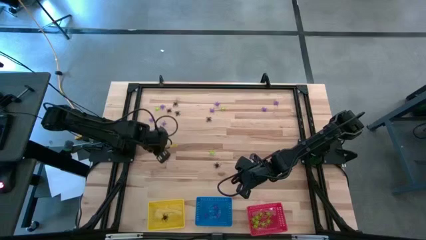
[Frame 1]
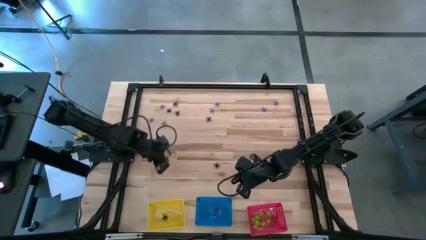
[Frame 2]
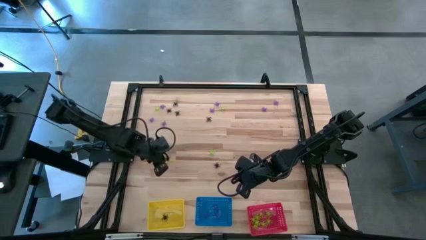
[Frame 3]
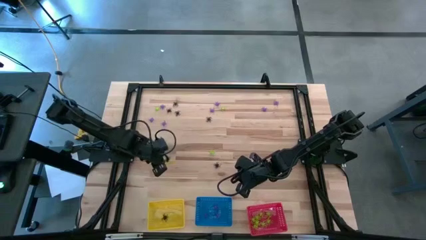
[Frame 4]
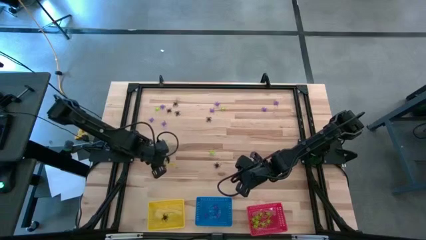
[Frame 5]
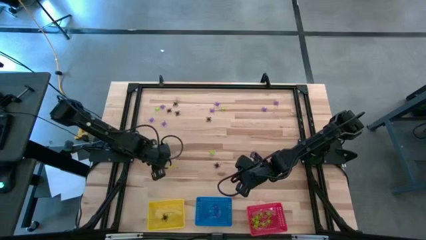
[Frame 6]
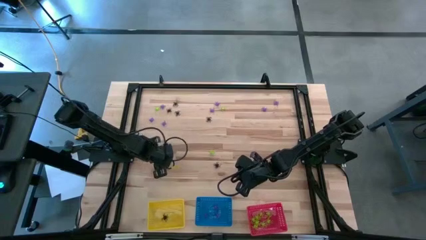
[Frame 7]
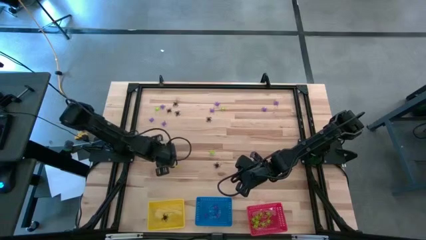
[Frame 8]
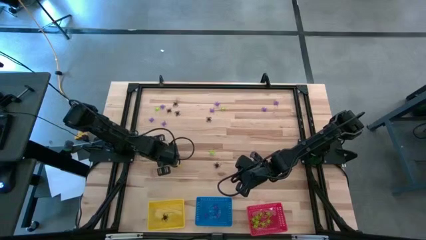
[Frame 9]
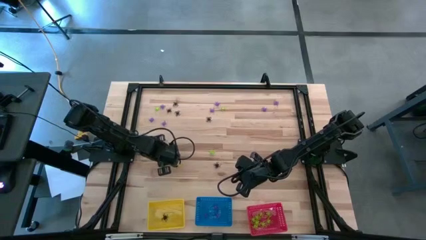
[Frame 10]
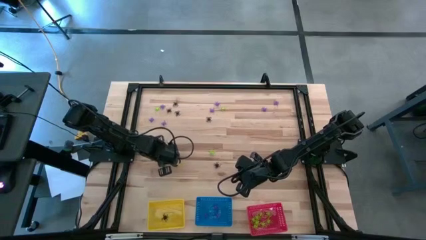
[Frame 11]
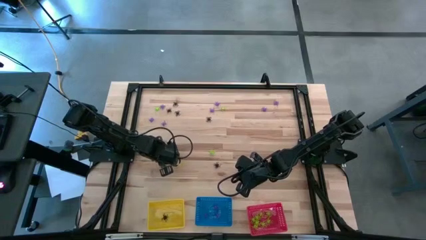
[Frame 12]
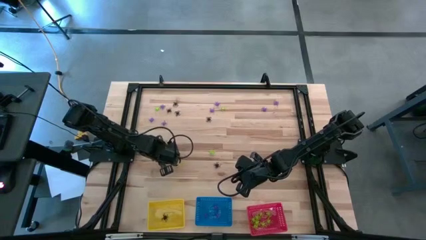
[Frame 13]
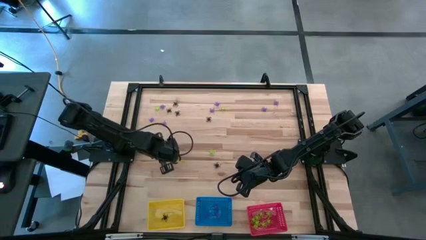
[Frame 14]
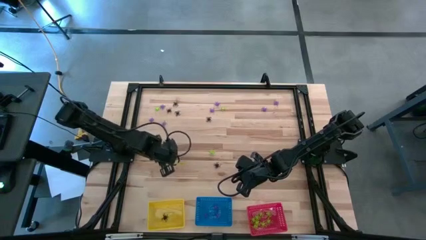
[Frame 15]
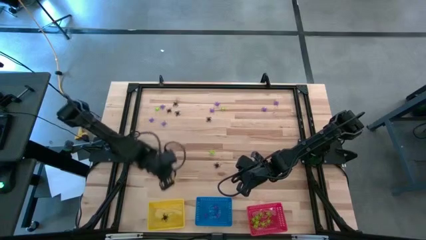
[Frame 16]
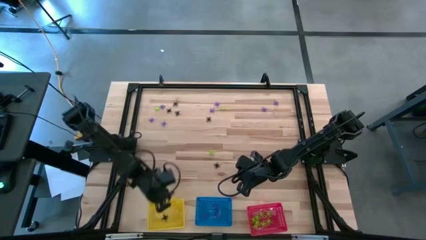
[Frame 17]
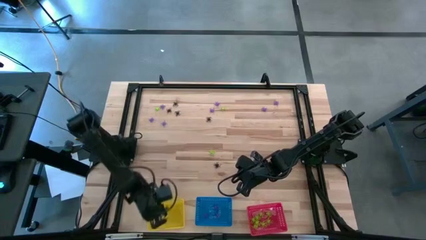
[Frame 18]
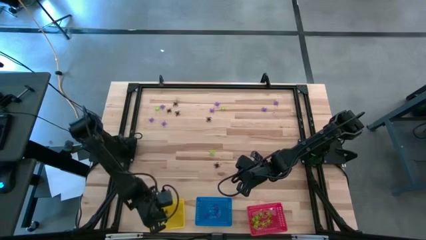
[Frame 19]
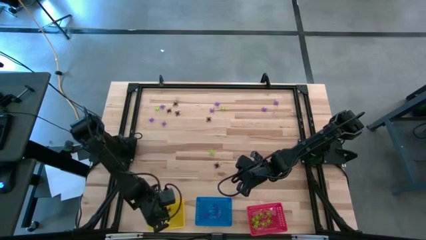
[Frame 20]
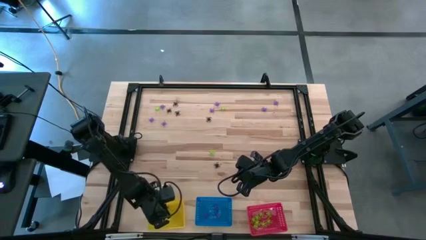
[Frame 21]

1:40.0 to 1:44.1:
Task: Sort Halloween decoration
Put the black spider toy into the yellow bin

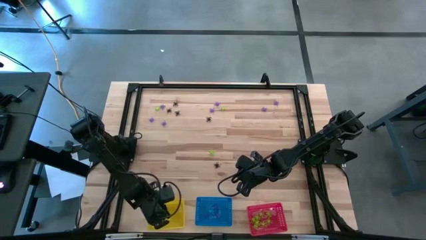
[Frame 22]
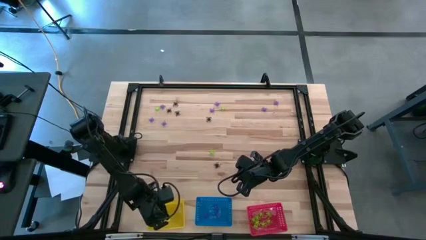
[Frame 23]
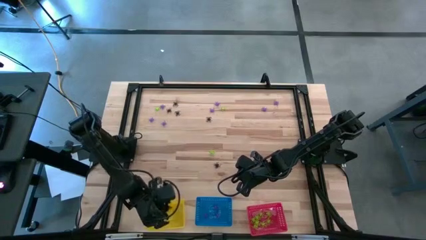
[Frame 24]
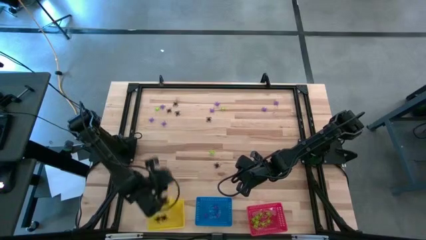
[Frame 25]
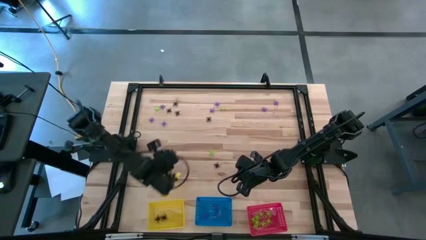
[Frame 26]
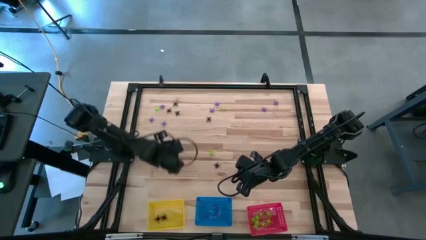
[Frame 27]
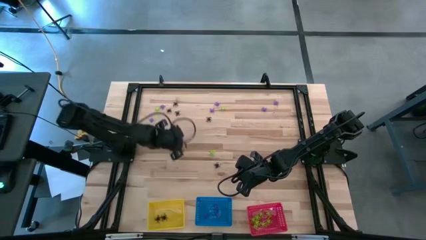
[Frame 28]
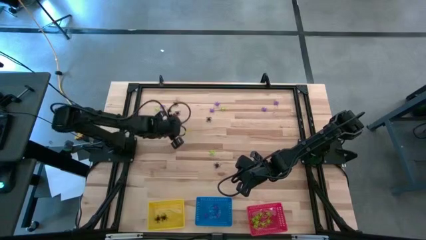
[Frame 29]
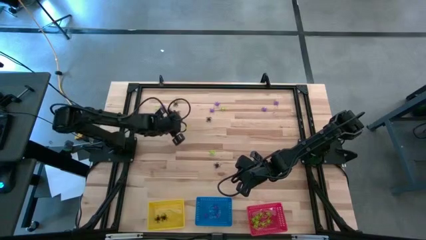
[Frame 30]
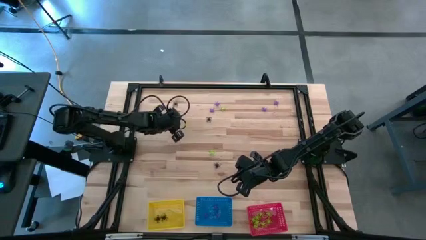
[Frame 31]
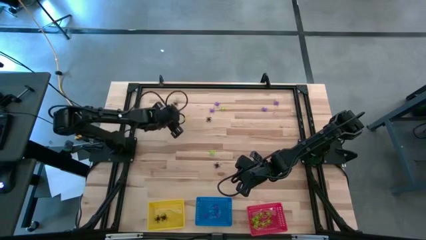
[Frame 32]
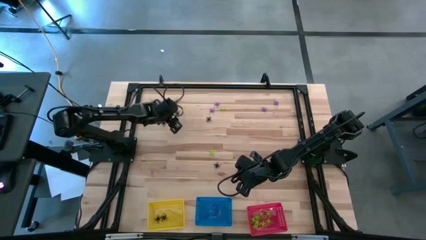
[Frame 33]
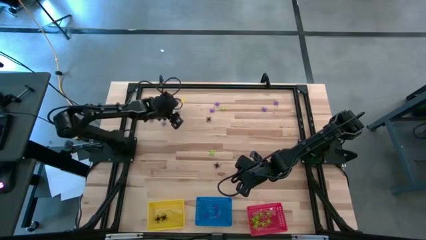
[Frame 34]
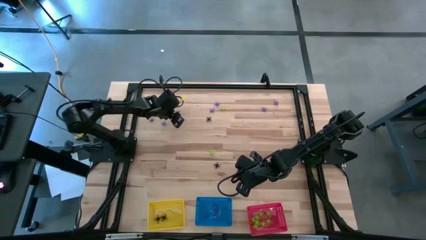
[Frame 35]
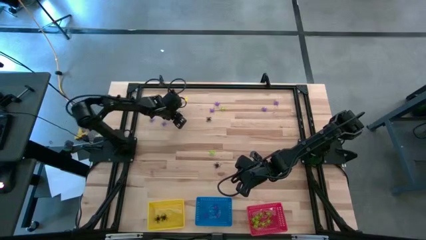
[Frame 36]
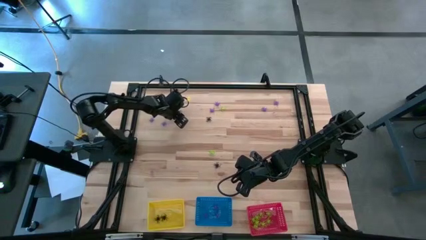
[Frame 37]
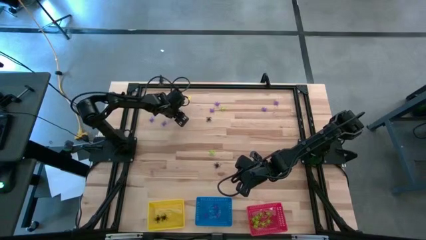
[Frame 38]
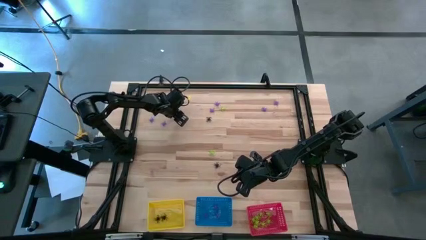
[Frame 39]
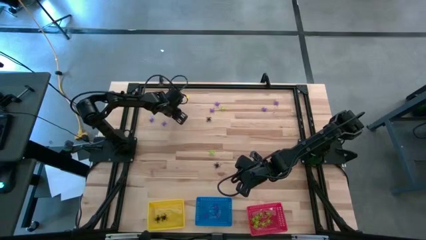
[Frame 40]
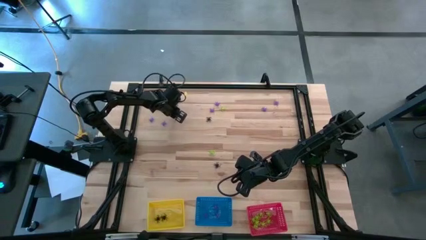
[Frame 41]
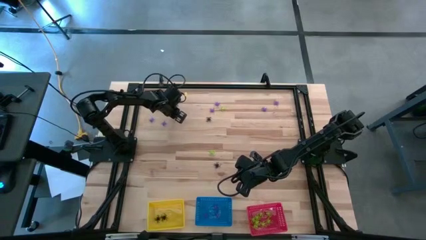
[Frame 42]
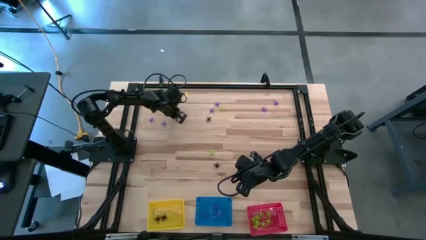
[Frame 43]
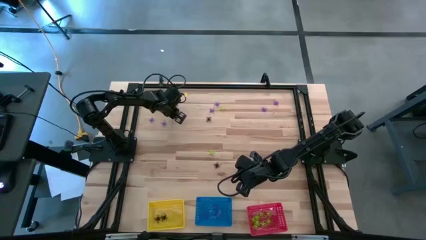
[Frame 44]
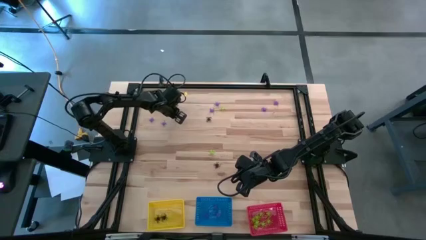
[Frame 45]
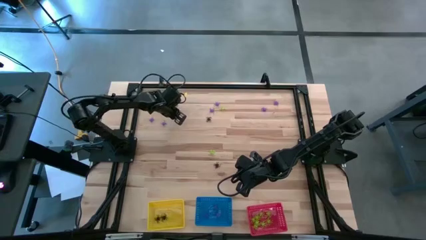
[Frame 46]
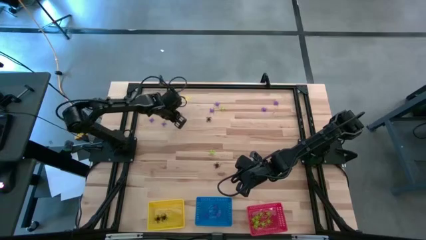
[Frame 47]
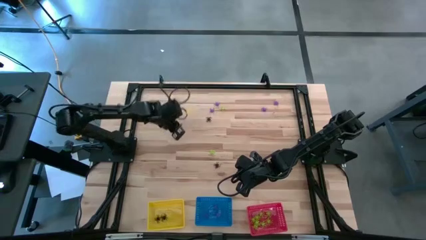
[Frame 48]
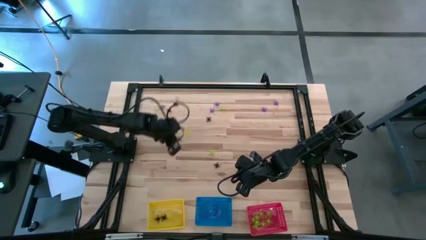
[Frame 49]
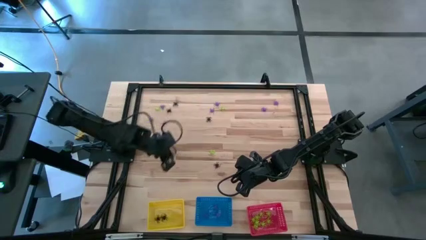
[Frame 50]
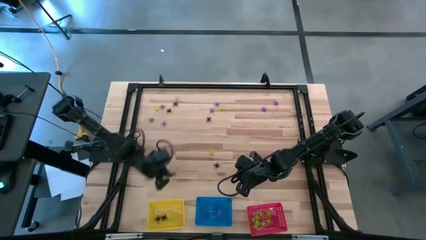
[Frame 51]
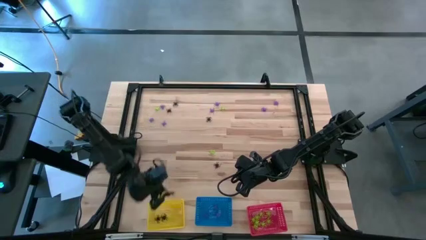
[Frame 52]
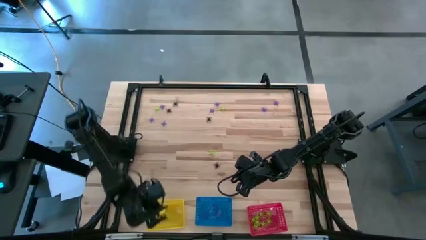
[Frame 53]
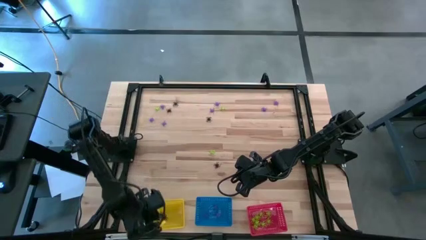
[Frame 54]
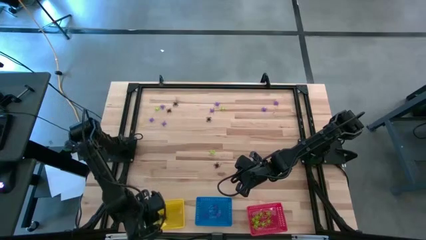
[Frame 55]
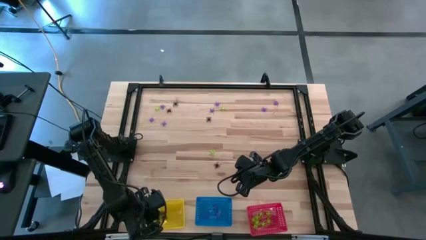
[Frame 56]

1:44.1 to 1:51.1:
Put the black spider toy into the yellow bin

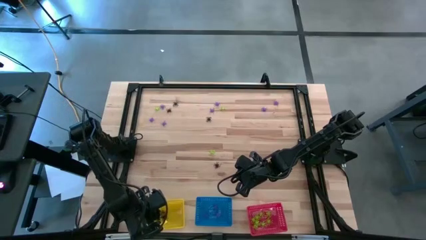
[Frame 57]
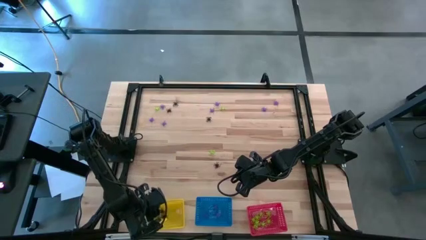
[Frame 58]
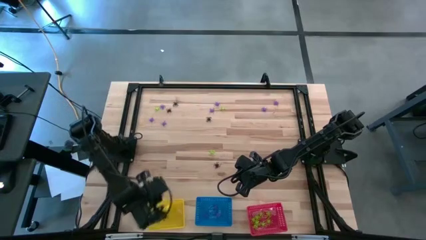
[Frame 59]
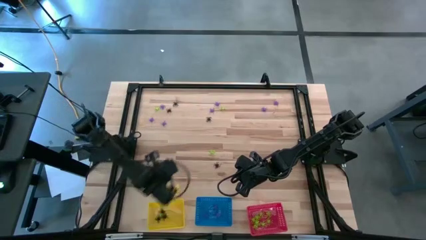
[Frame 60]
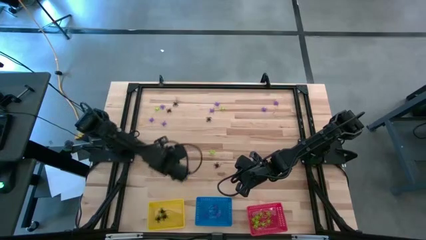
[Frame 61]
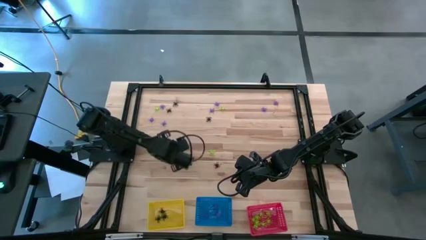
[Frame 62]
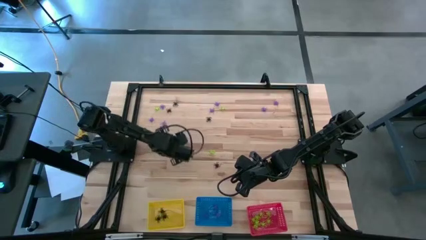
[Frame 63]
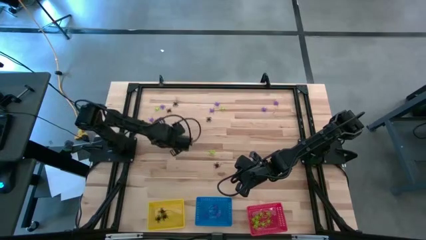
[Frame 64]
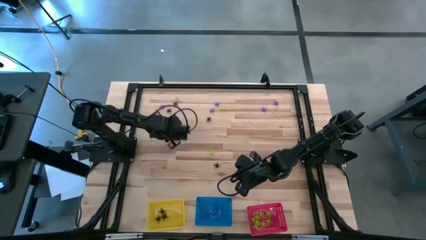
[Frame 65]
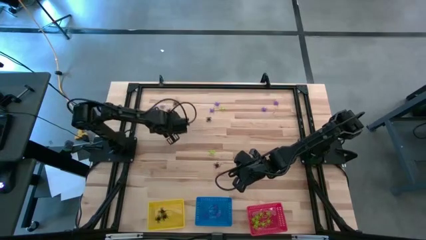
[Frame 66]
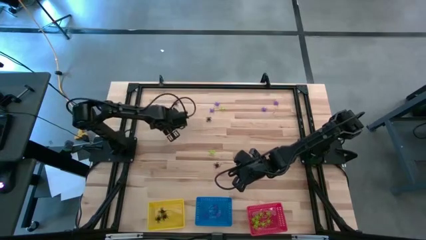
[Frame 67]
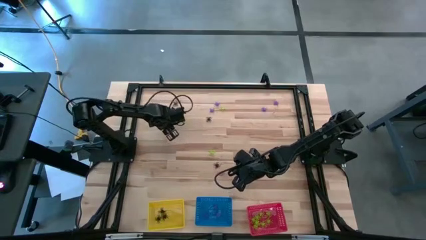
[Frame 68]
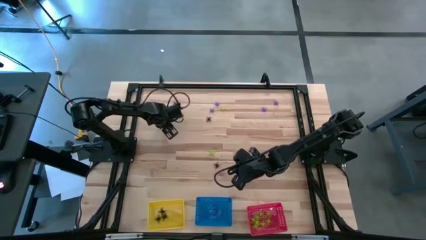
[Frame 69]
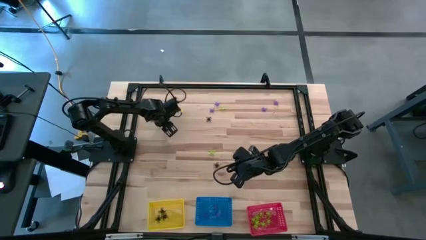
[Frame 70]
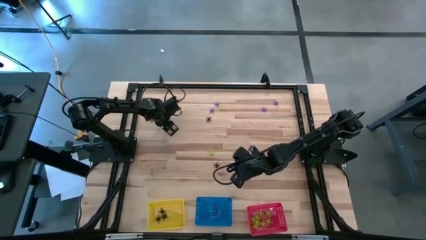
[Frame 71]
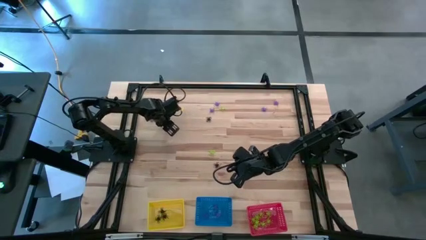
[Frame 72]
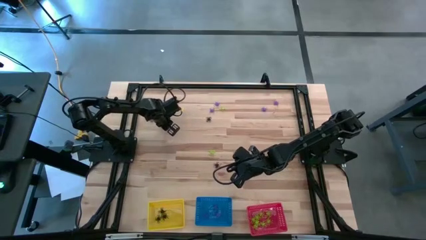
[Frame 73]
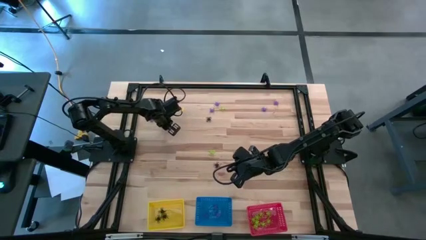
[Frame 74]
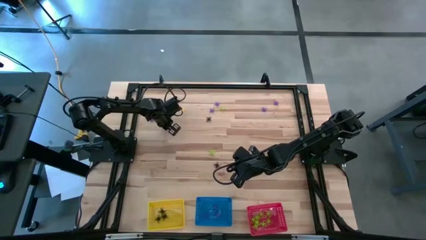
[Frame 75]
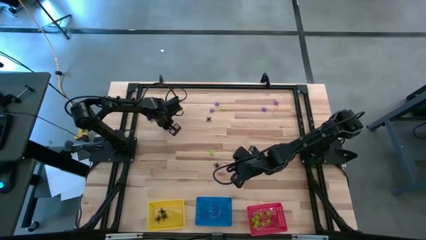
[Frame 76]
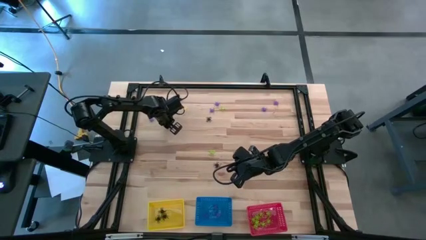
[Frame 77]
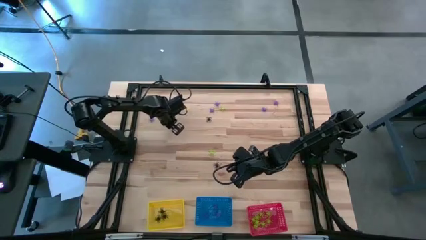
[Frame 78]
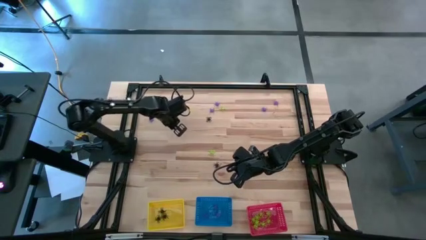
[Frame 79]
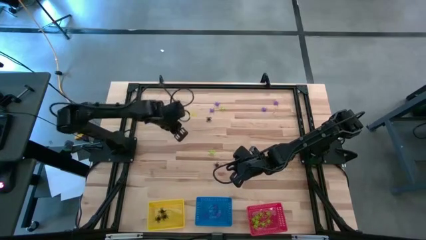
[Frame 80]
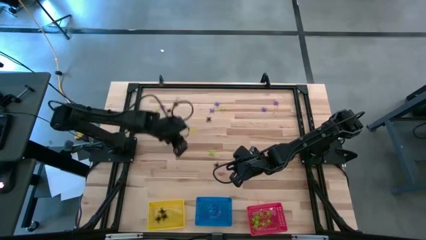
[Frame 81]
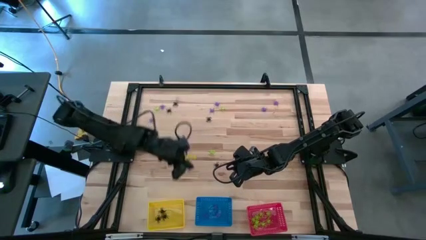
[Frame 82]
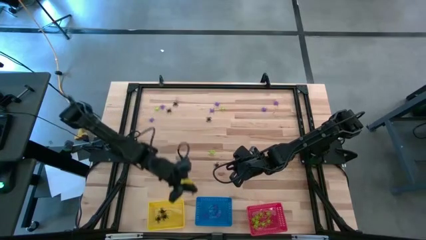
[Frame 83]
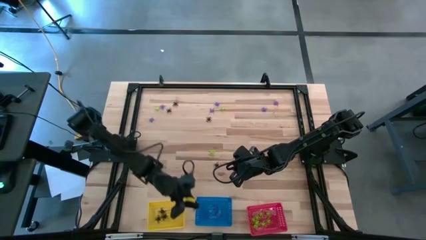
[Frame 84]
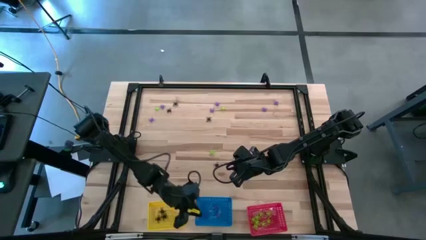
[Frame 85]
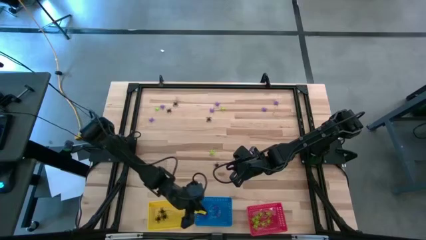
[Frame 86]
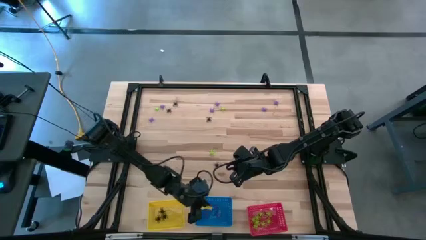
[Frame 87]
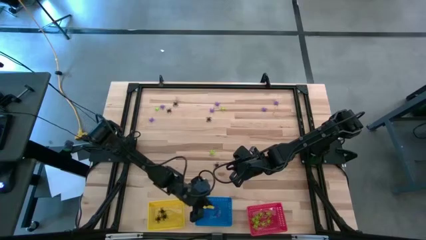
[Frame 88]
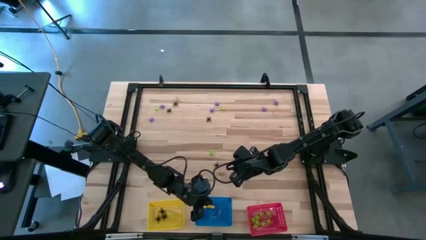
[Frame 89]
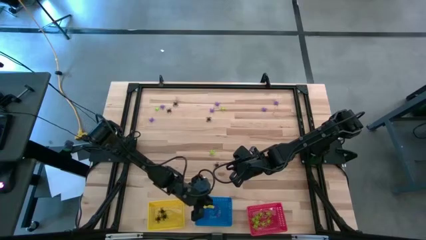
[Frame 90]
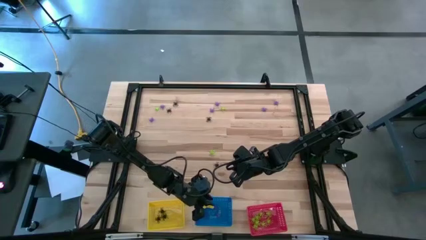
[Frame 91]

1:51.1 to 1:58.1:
Put the violet spider toy into the blue bin
